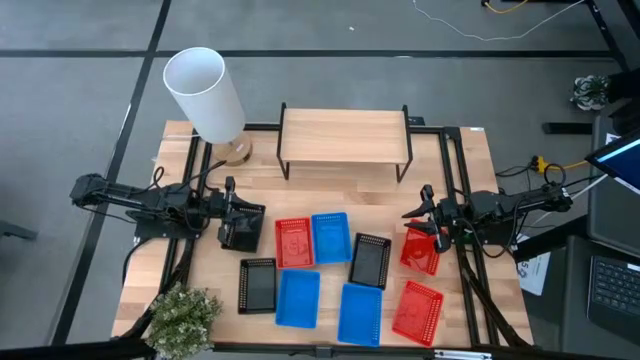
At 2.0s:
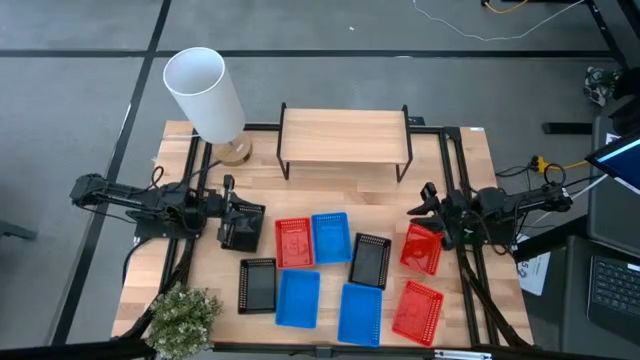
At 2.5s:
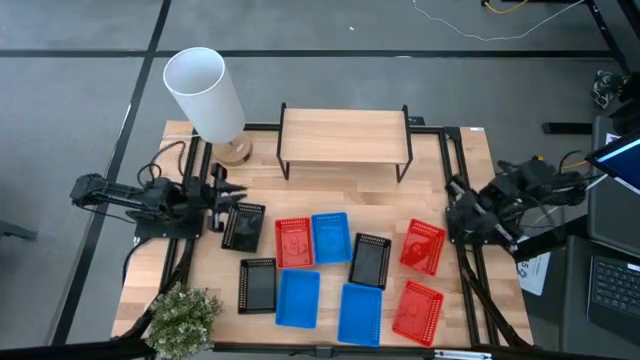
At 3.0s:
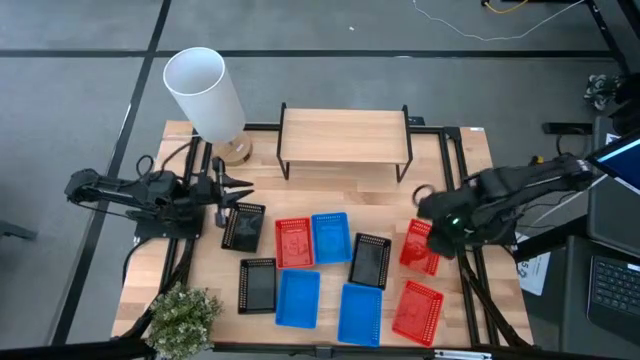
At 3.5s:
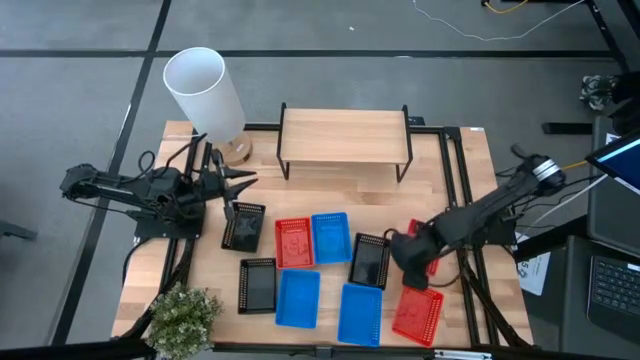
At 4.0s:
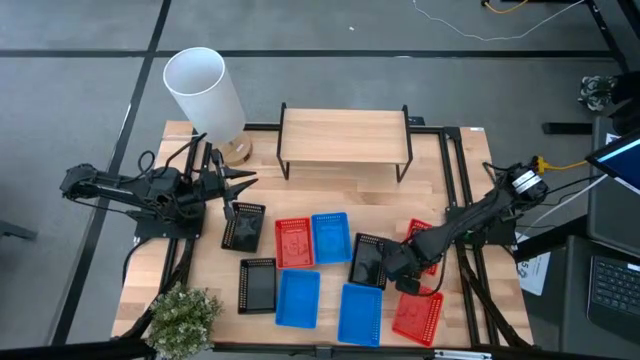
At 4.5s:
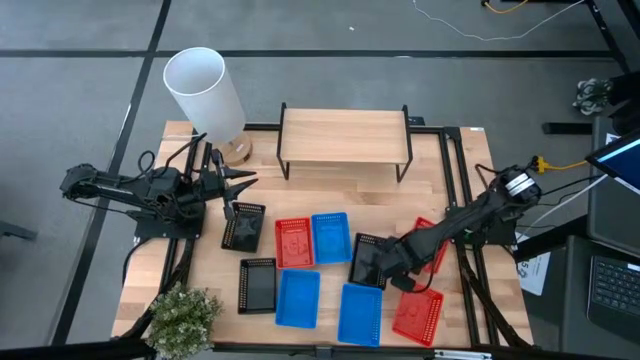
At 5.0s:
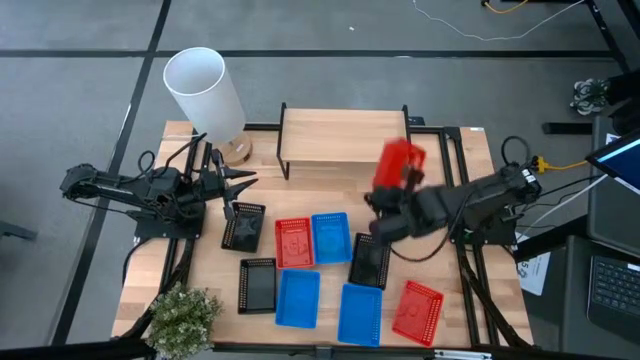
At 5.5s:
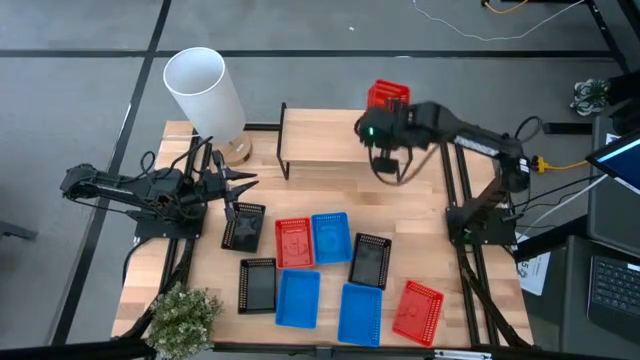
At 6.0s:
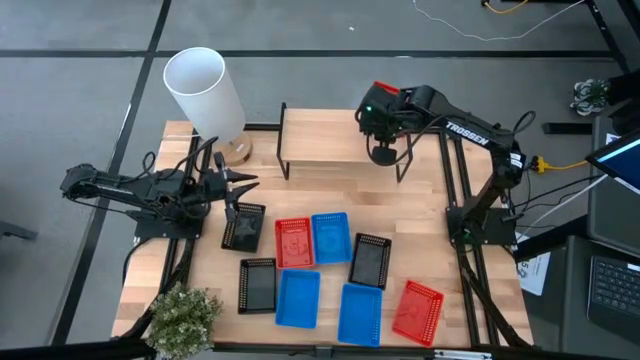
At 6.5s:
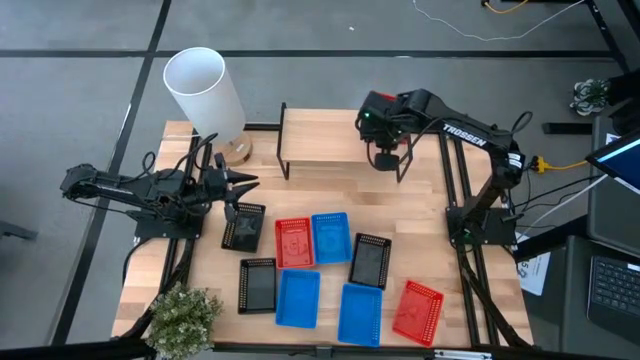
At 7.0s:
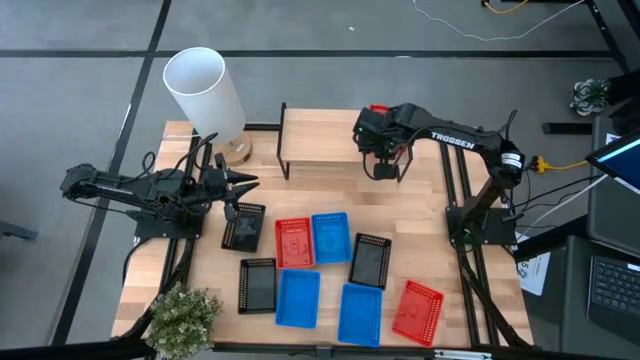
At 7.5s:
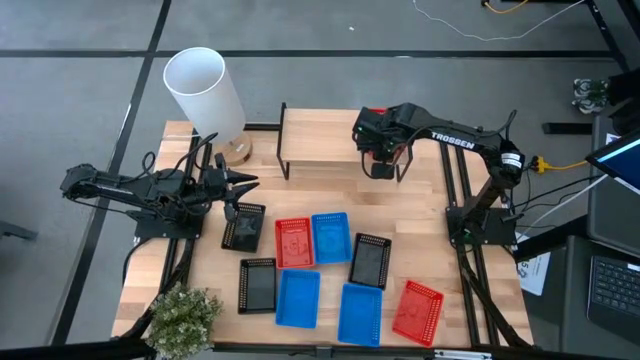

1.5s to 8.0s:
Task: Stack baskets on shelf by color
Put the top right red bin on the shelf

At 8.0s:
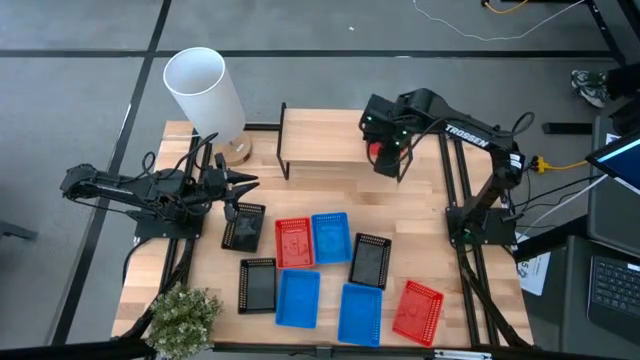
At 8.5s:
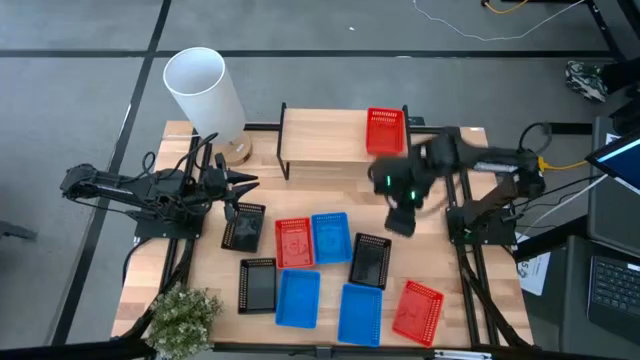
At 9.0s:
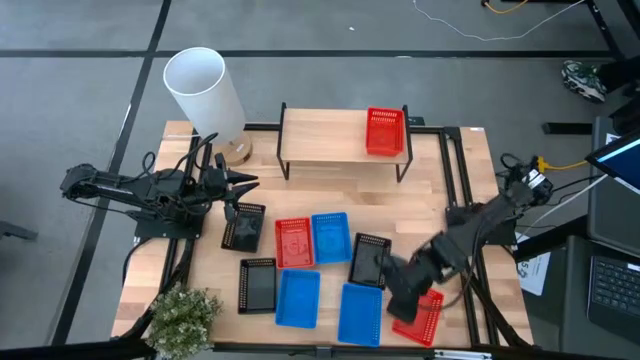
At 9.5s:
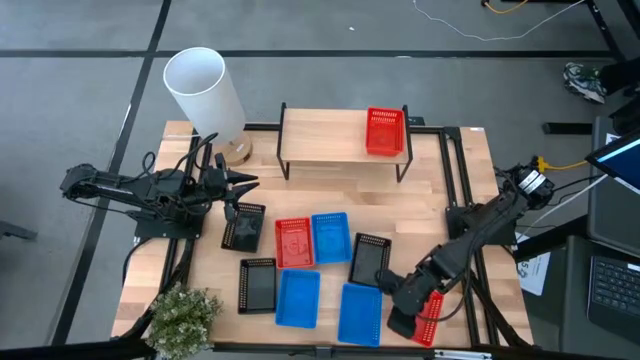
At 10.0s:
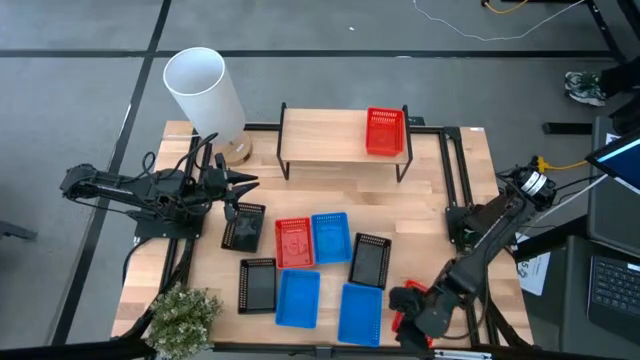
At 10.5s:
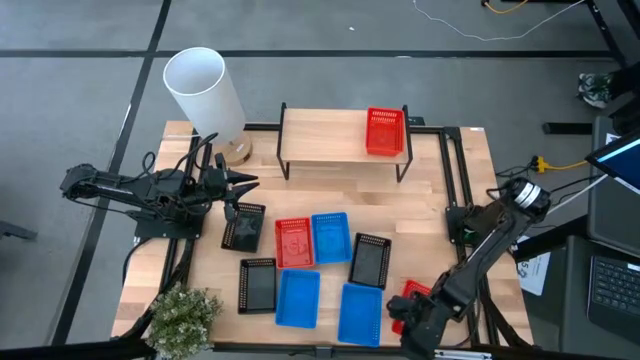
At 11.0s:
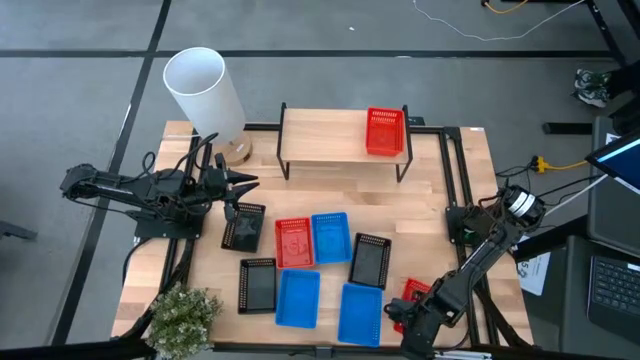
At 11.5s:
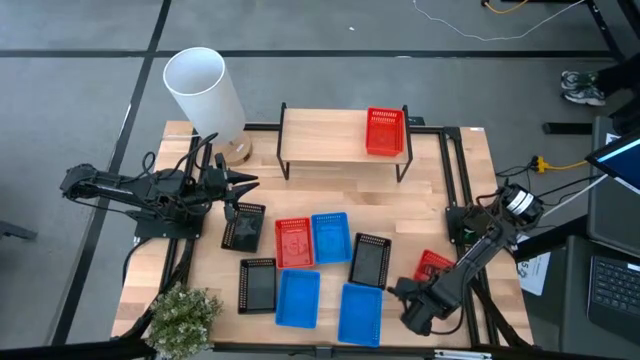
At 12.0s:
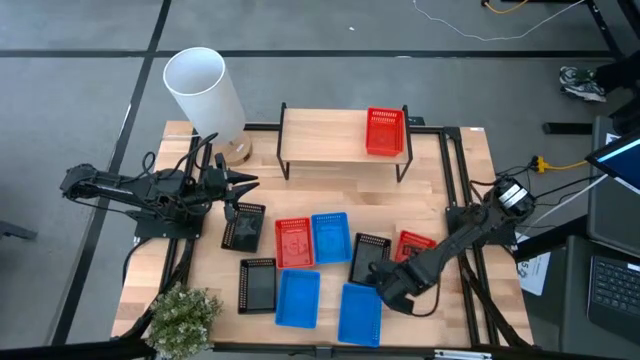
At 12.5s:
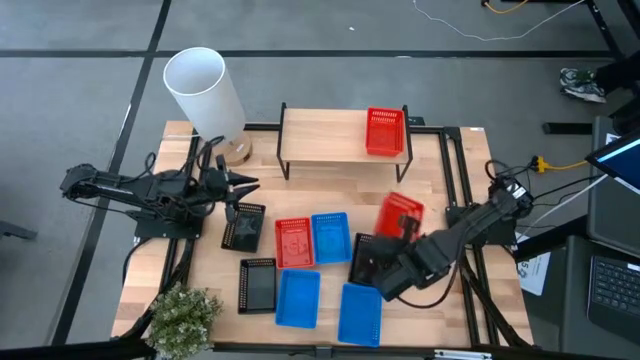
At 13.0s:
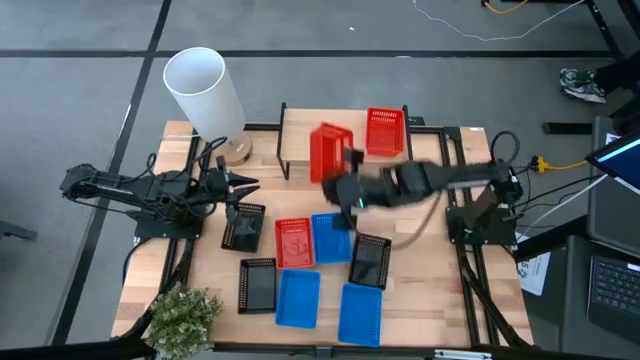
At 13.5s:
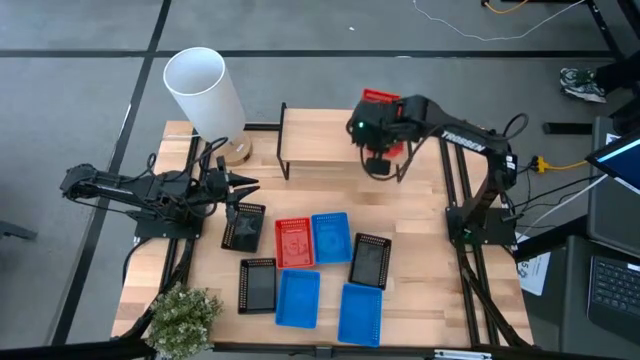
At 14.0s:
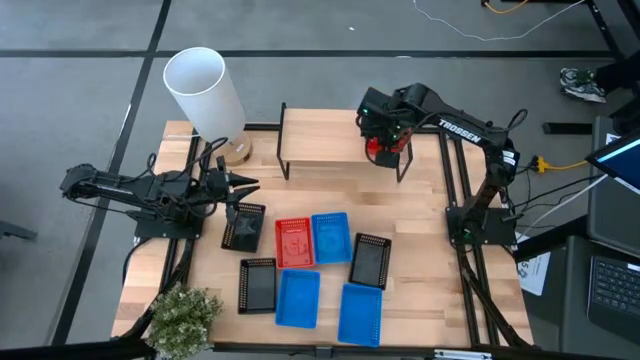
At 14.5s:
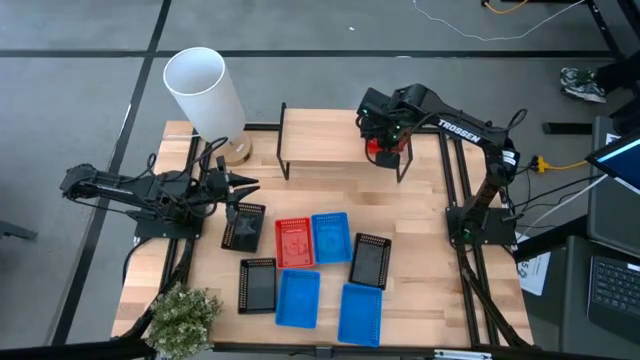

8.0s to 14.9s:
Stack the right red bin on top of the other red bin on the shelf

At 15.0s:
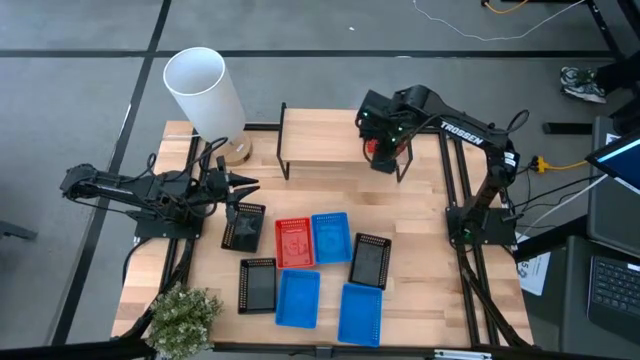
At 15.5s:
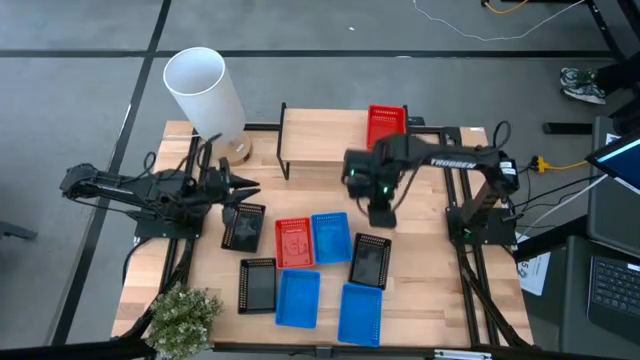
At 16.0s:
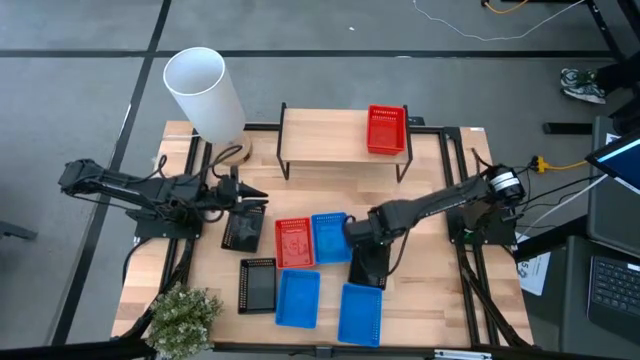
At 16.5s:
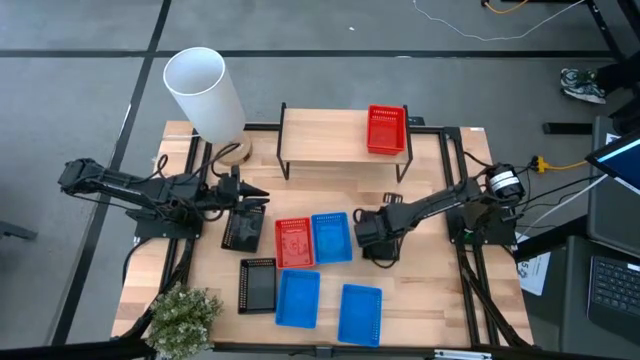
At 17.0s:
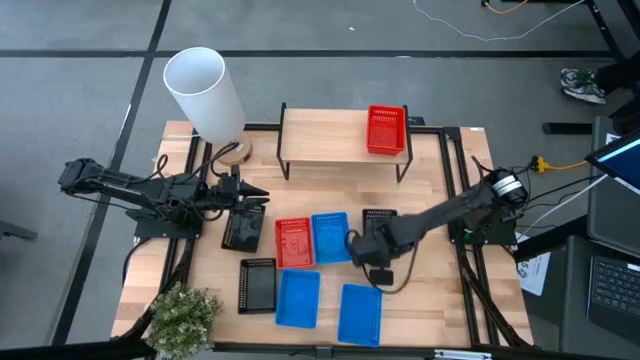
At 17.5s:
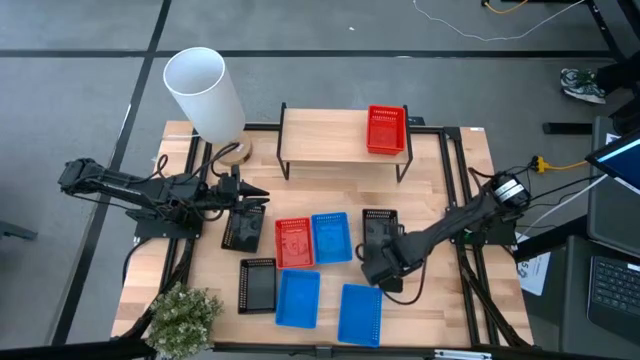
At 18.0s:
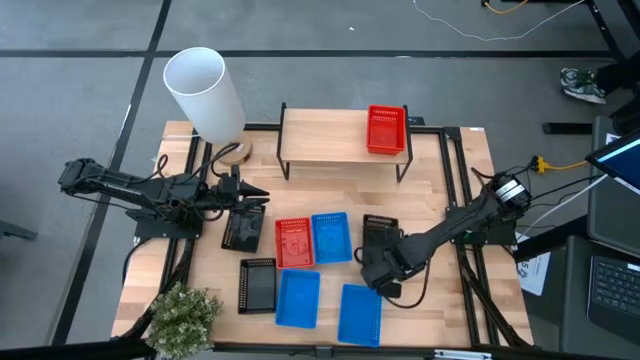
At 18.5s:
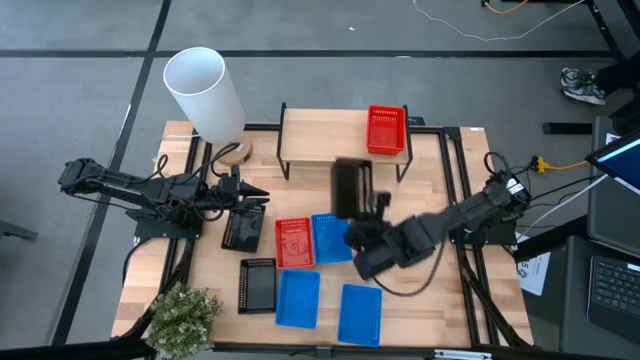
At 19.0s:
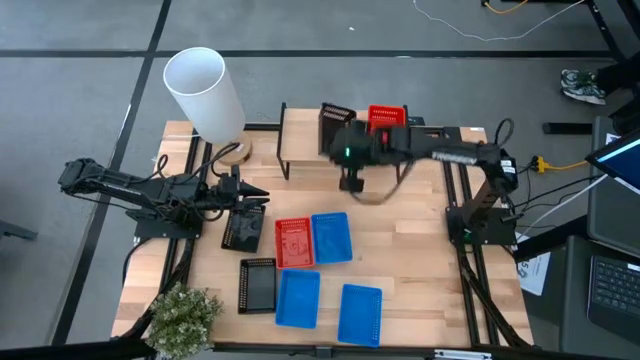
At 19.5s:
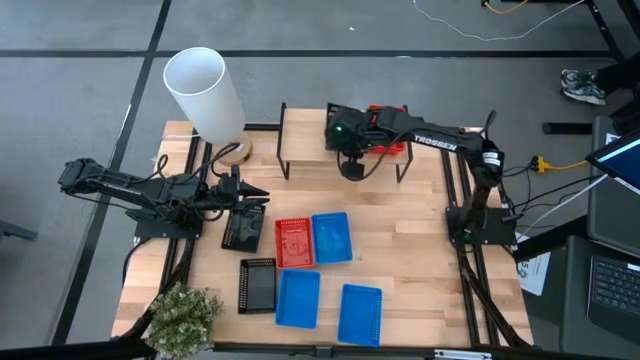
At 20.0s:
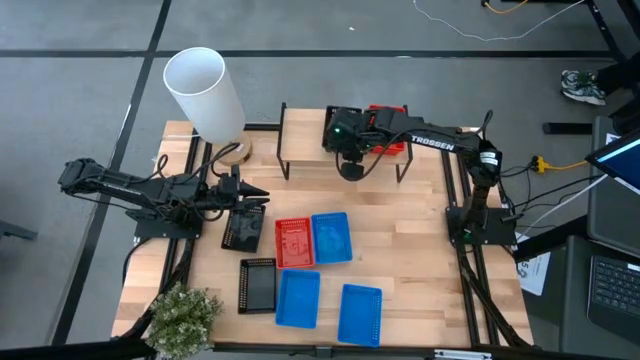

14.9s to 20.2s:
Put the right black bin on the shelf

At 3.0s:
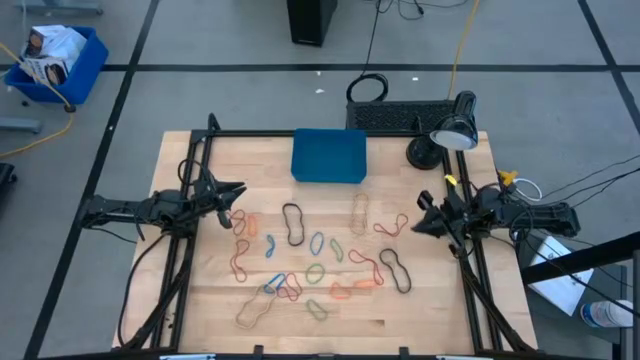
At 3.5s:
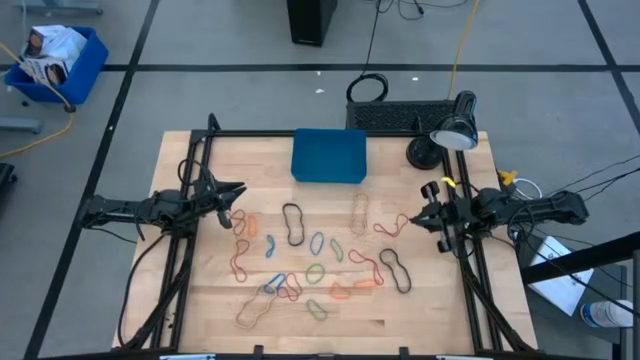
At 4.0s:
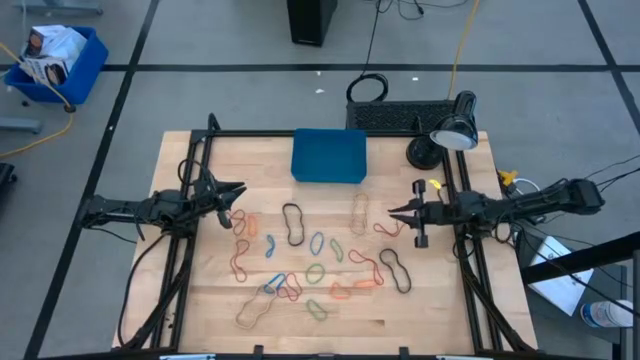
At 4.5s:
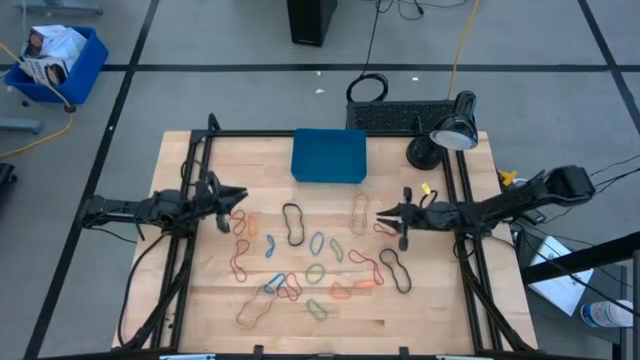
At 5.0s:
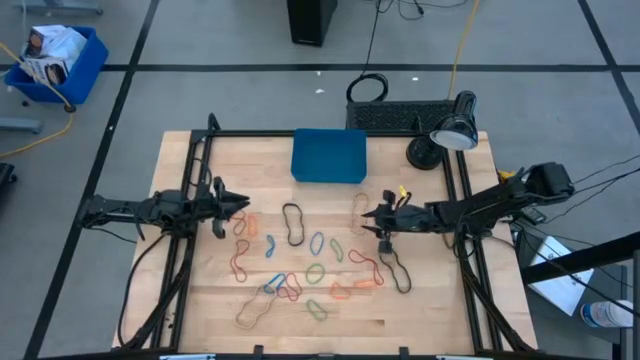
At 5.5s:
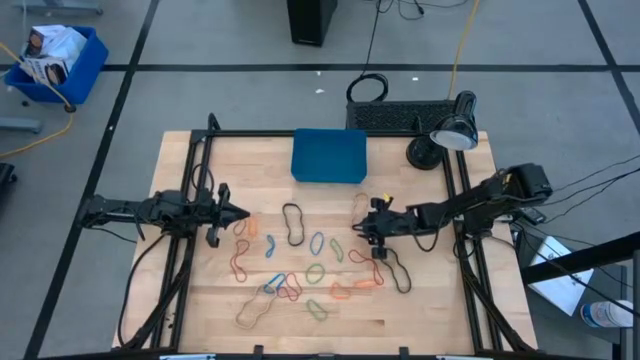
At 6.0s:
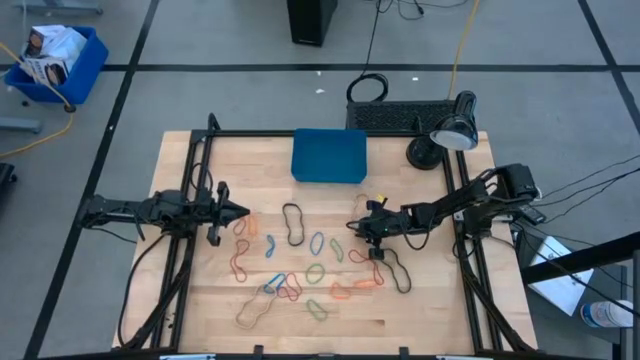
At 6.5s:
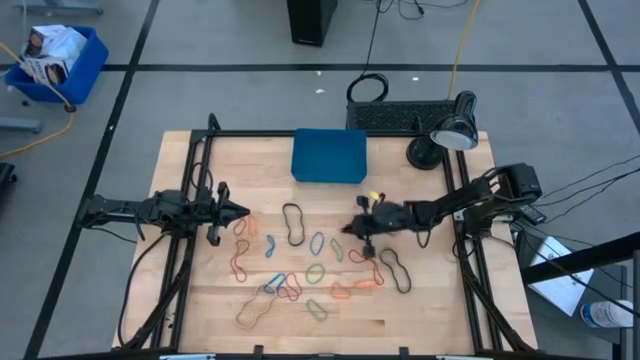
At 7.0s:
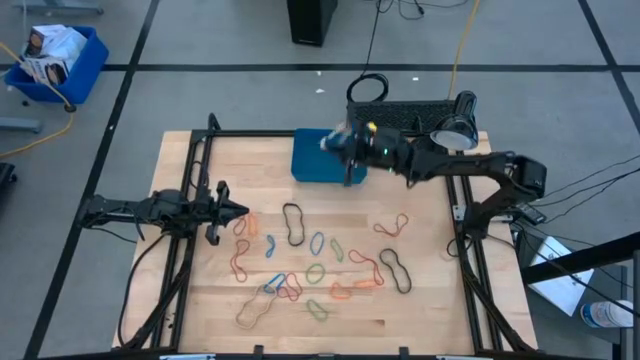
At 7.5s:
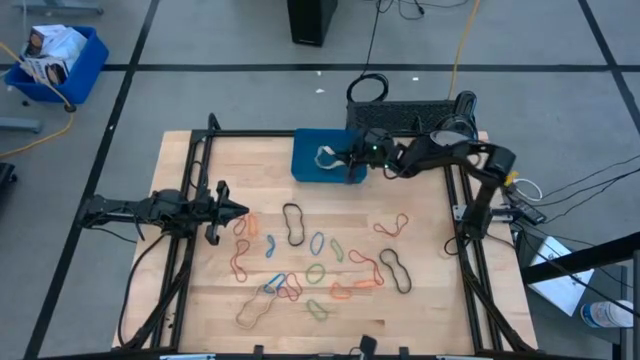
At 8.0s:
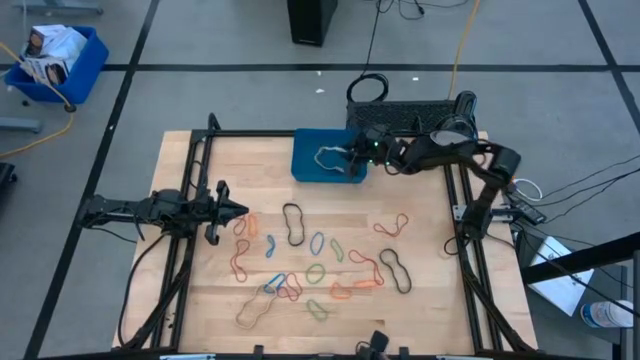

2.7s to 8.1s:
Task: Pick and place rubber bands into bin
Put the brown rubber band into the blue bin
